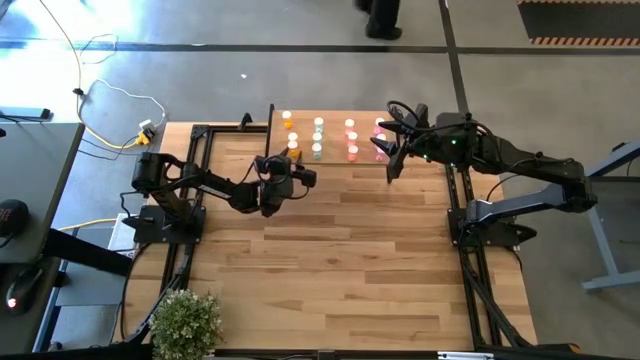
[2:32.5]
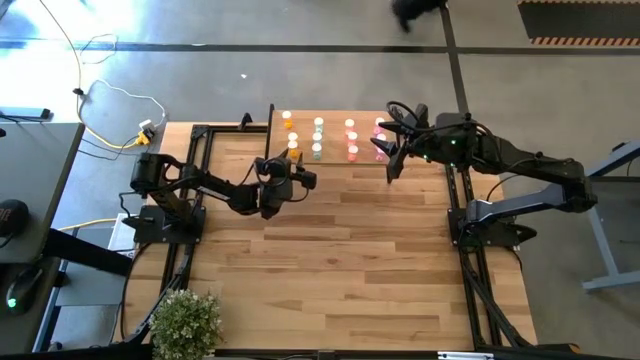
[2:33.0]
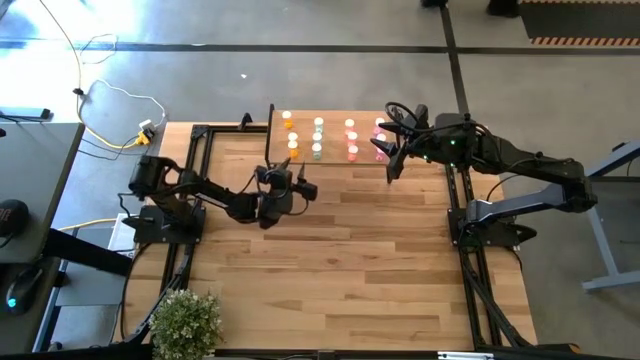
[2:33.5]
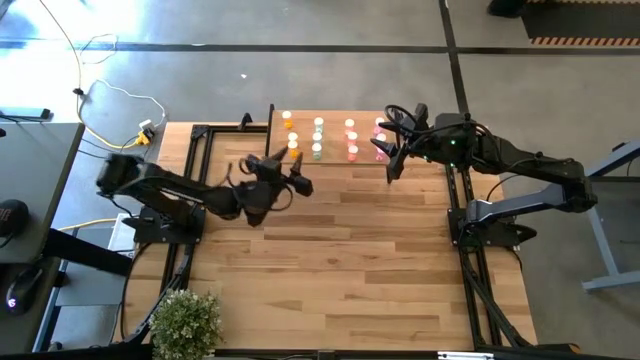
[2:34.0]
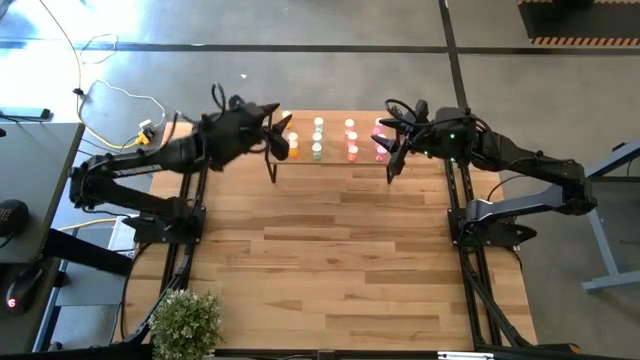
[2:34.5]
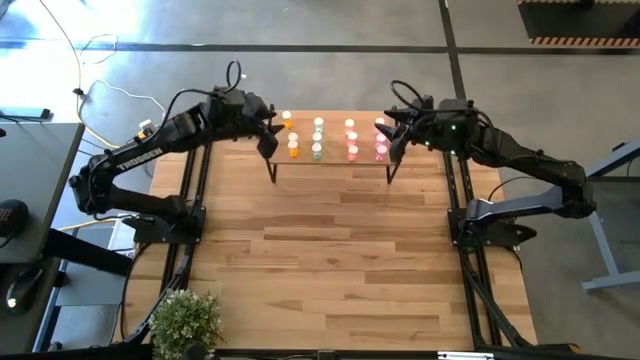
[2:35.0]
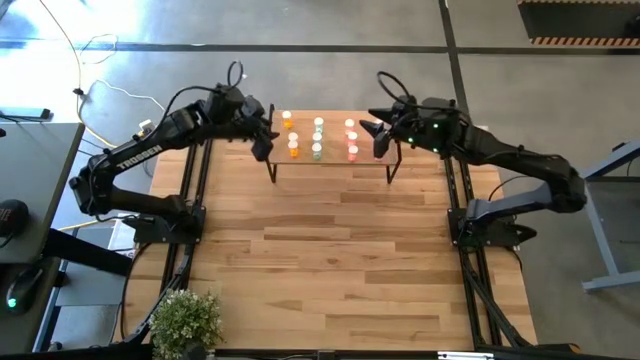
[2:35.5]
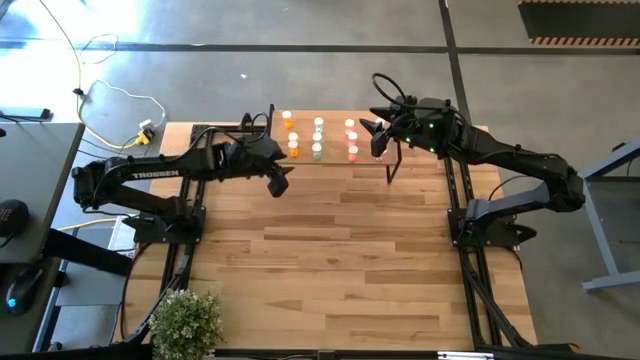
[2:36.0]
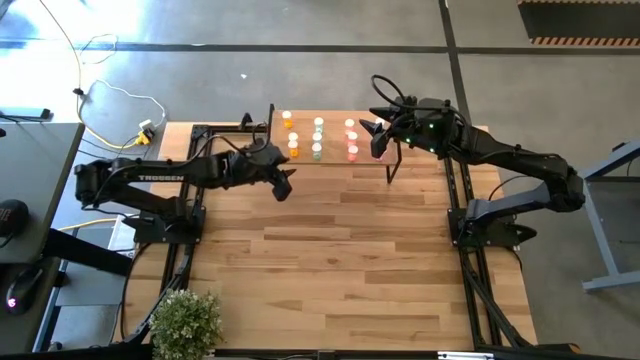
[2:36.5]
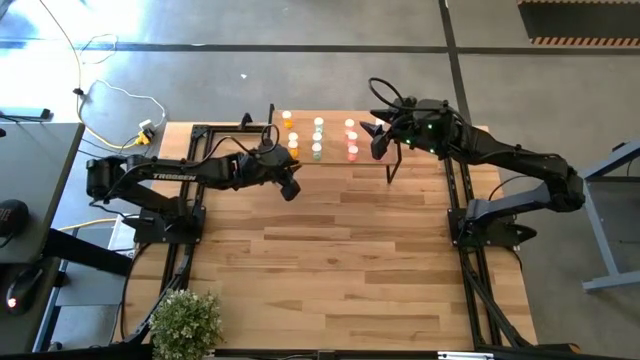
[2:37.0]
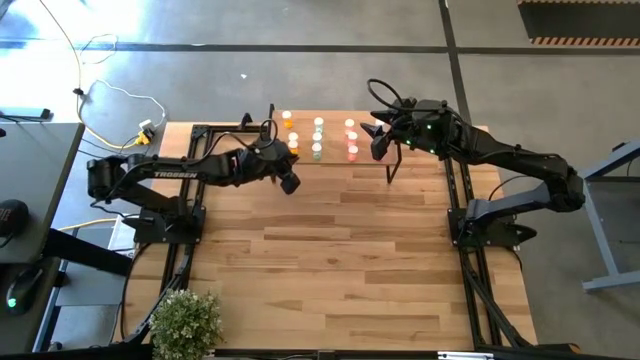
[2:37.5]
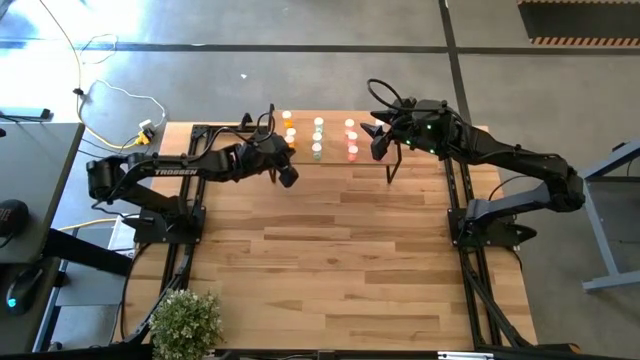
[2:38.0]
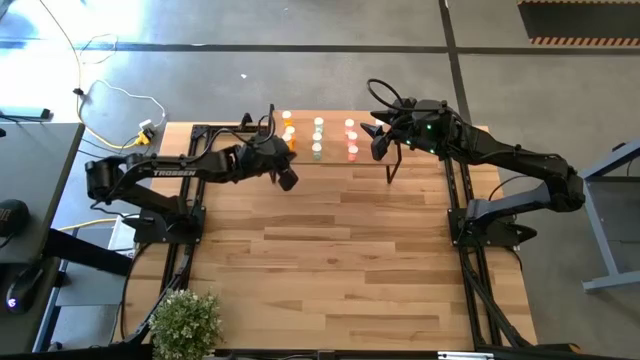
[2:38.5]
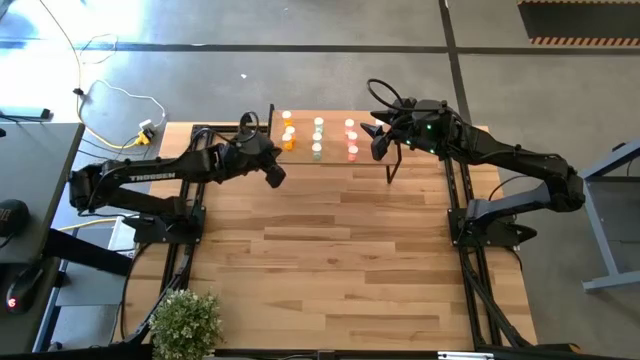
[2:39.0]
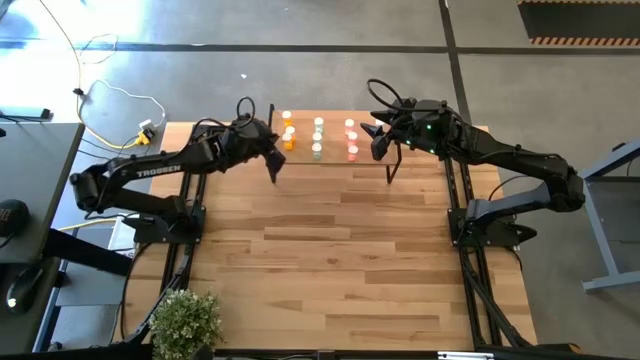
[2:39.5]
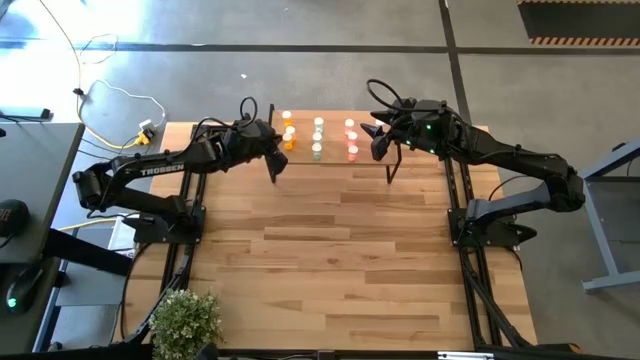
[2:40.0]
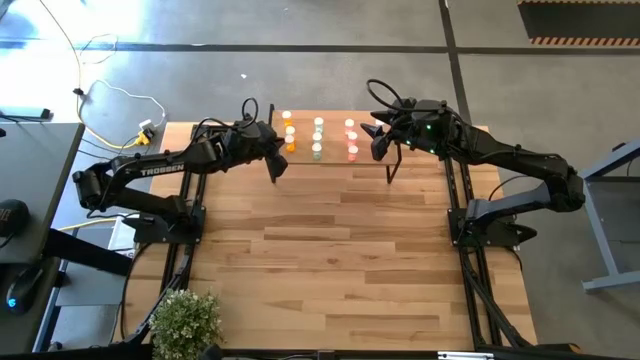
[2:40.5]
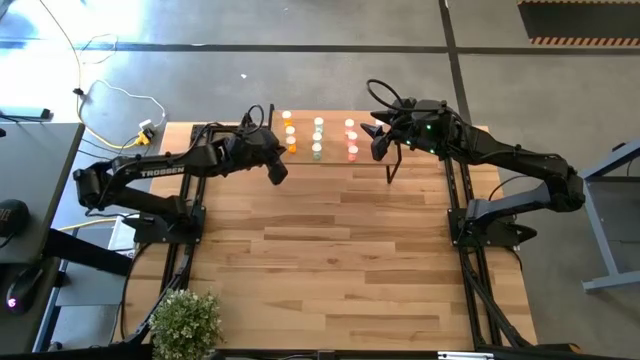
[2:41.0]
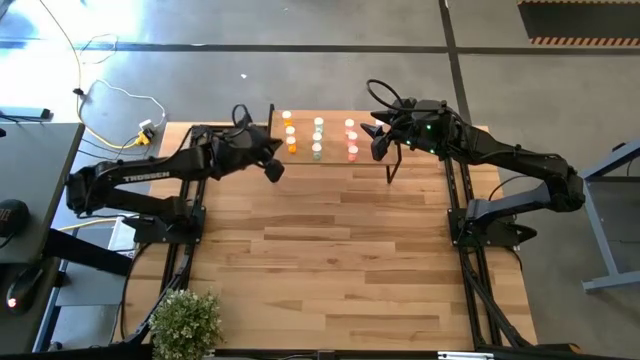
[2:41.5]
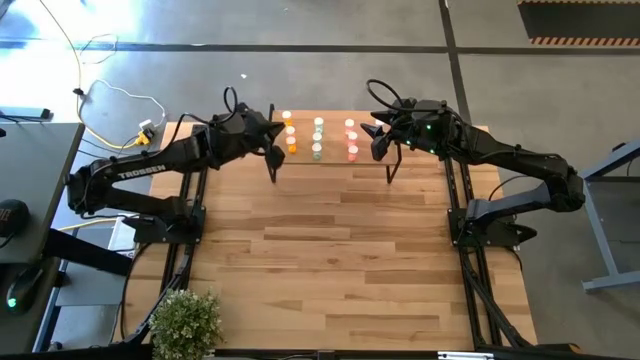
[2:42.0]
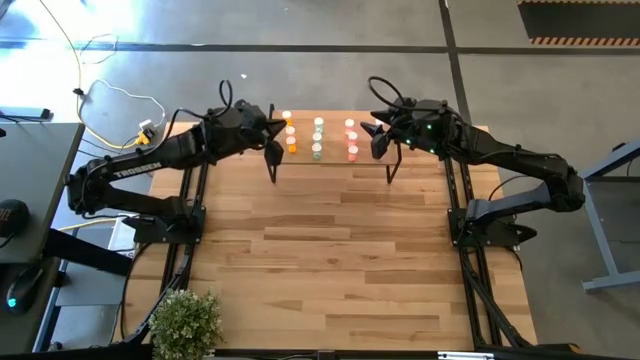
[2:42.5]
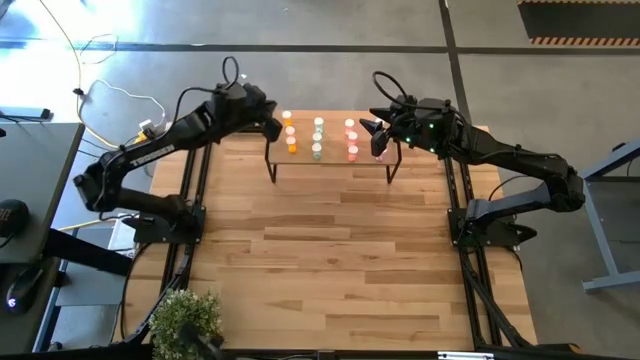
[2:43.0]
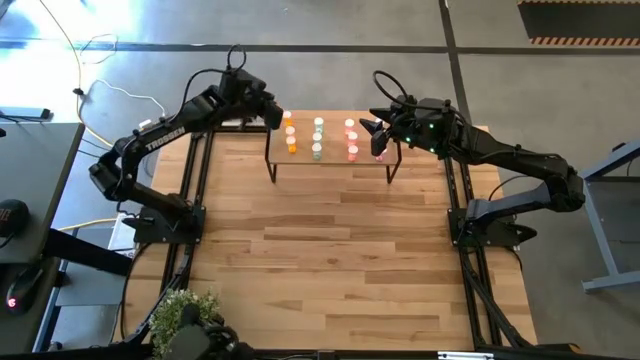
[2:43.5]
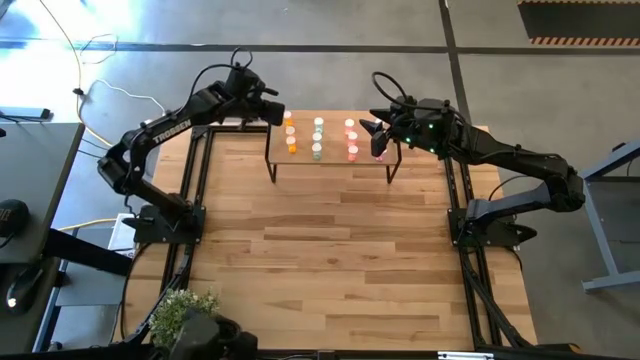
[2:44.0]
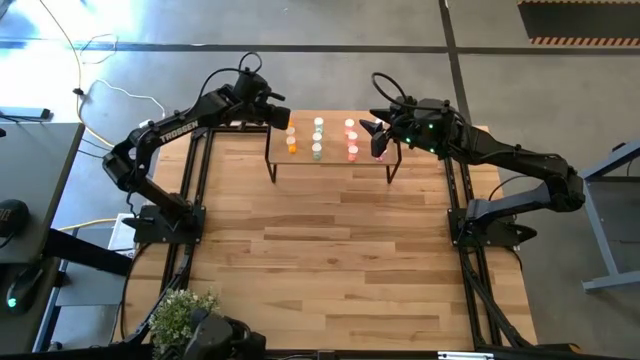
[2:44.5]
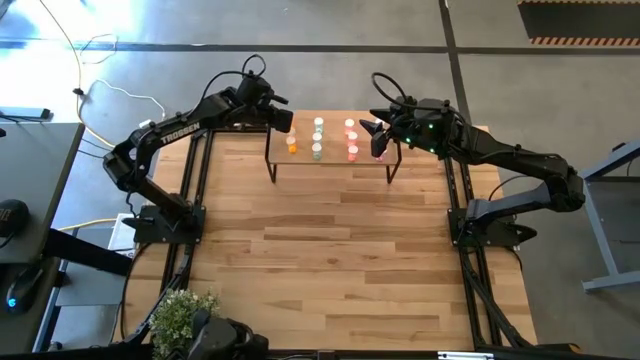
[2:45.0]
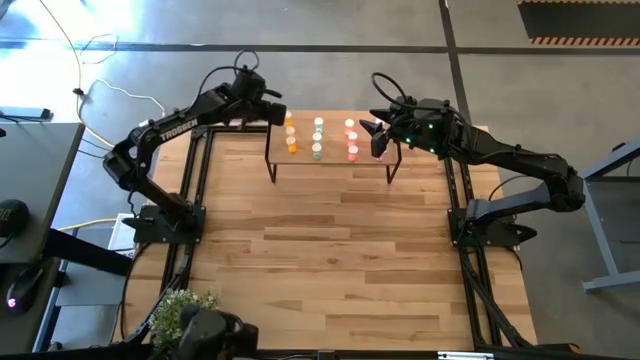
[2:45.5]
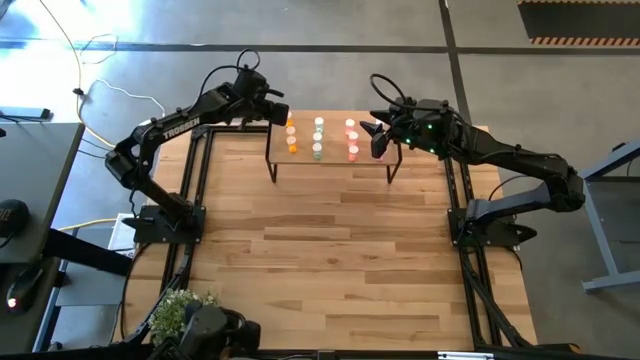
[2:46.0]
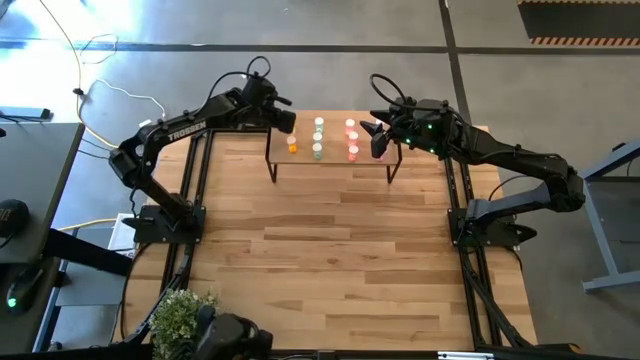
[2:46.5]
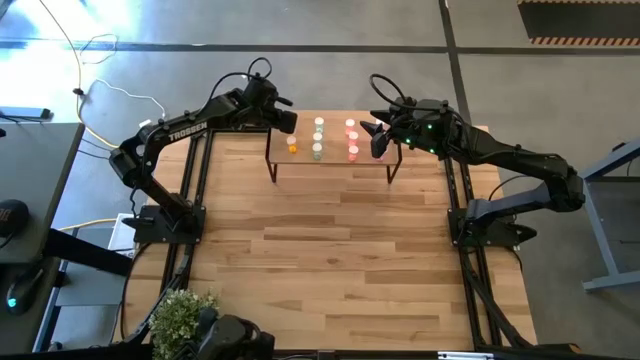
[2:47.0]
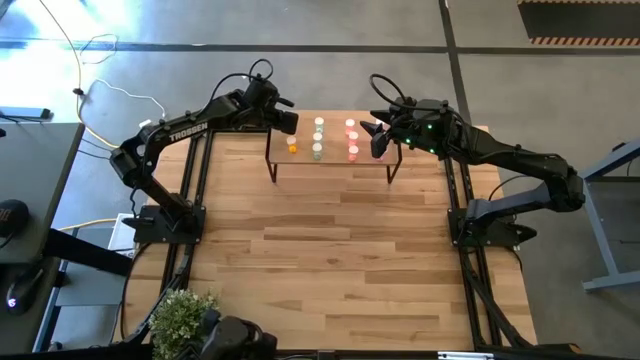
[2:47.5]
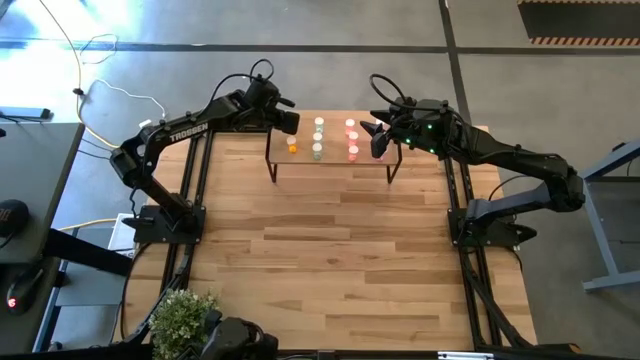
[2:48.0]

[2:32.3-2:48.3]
Task: Pick and place medicine bottles onto shelf by color
Adjust the orange pill bottles on the shelf

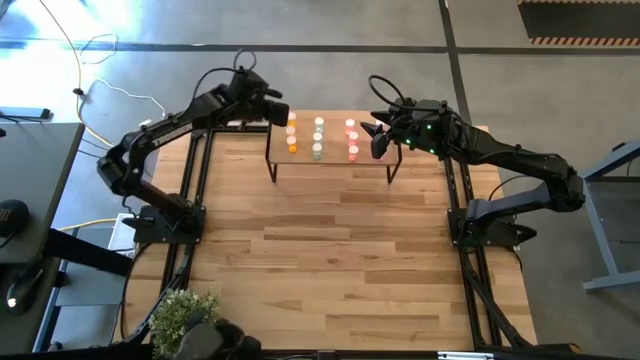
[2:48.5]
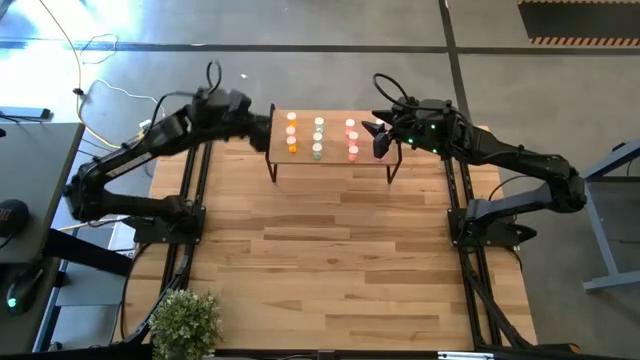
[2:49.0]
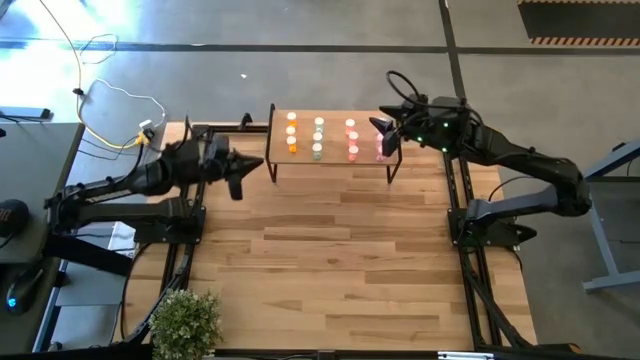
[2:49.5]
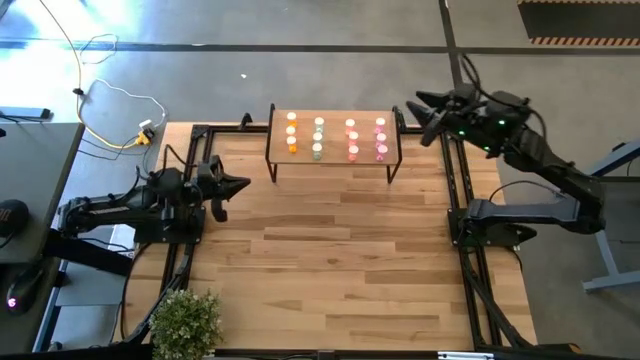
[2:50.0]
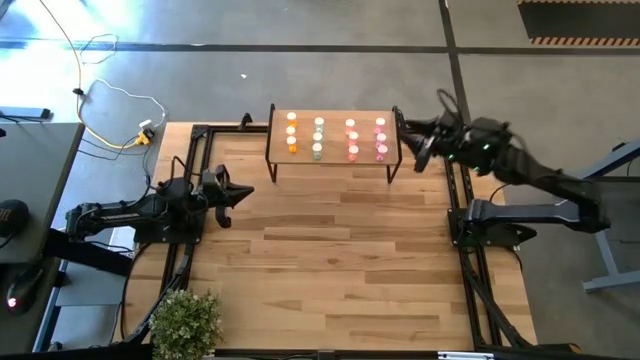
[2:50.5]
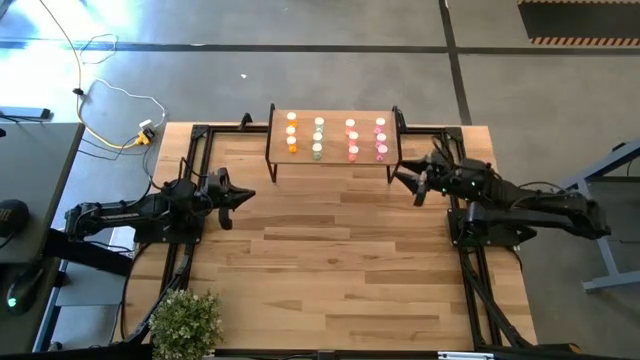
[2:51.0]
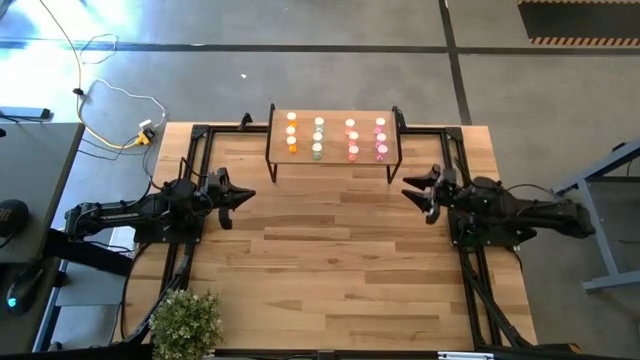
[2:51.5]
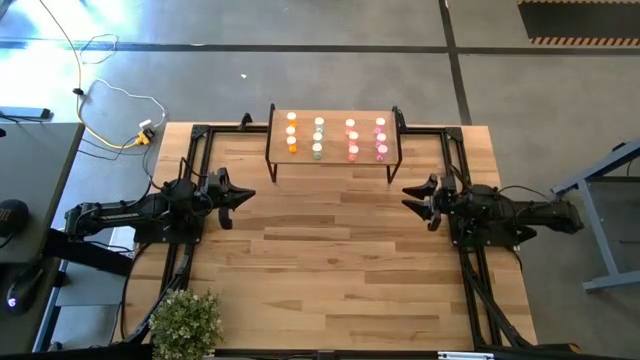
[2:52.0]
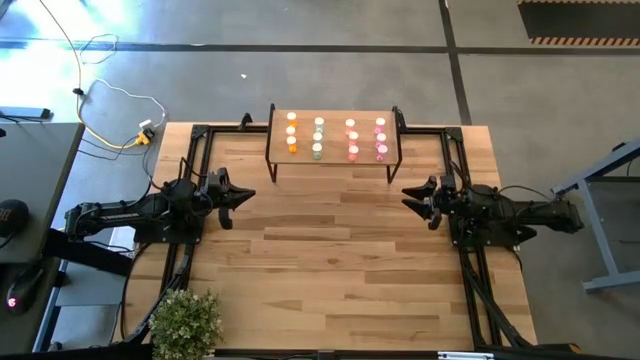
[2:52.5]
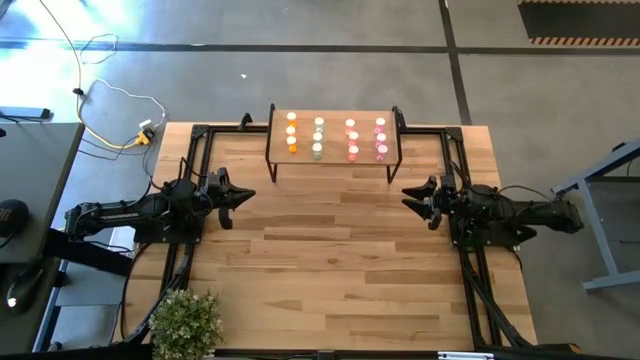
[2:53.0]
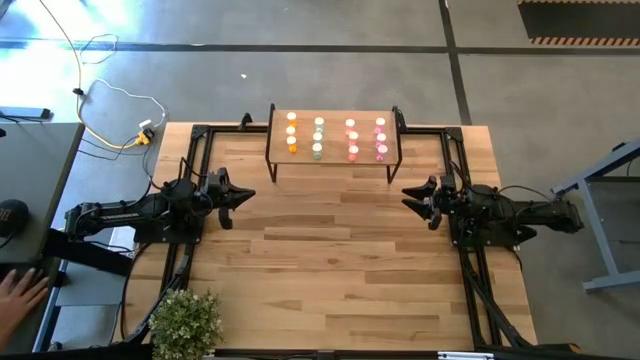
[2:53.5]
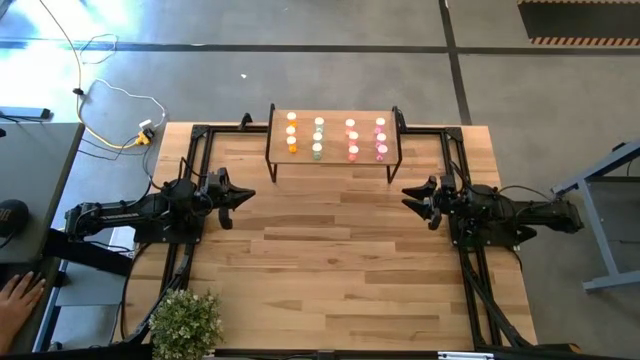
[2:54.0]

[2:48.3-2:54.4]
Return to Home Position
